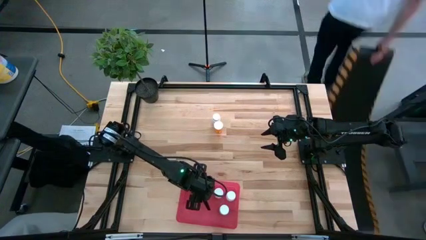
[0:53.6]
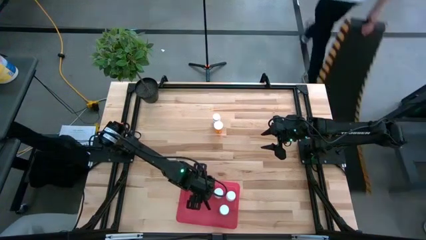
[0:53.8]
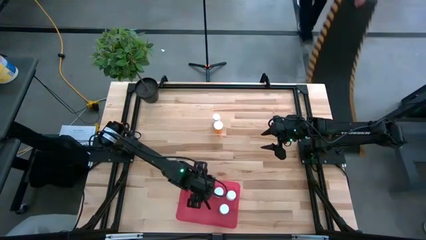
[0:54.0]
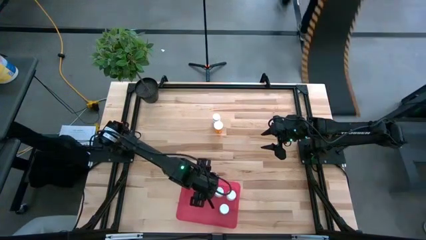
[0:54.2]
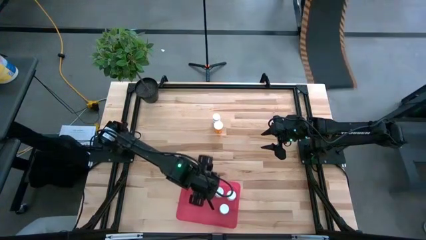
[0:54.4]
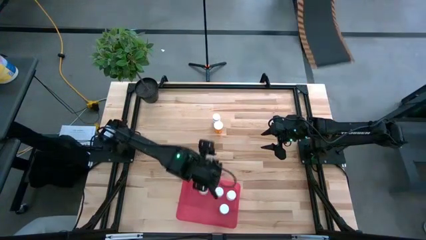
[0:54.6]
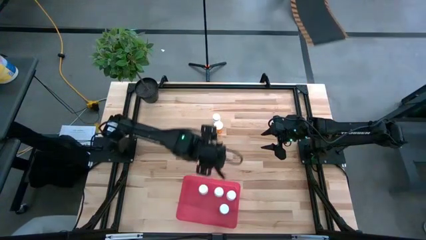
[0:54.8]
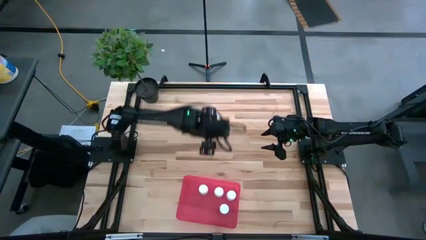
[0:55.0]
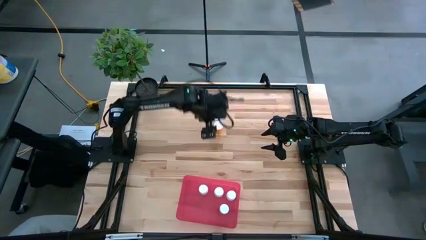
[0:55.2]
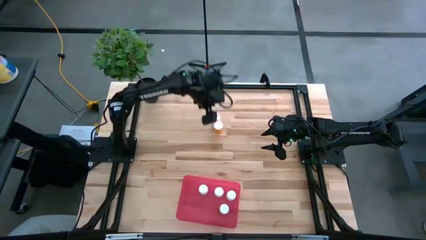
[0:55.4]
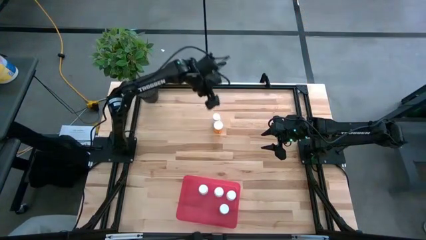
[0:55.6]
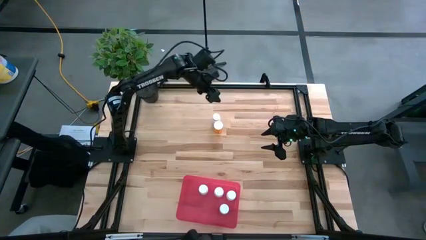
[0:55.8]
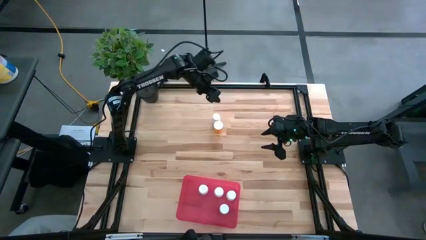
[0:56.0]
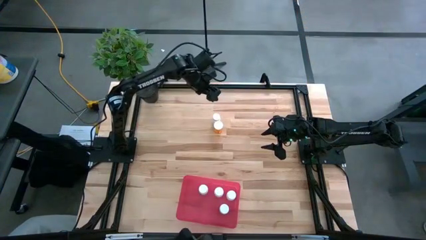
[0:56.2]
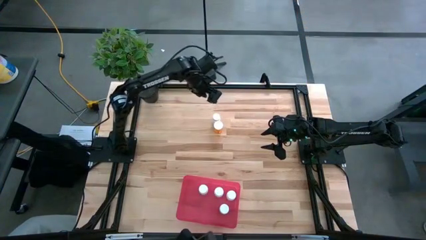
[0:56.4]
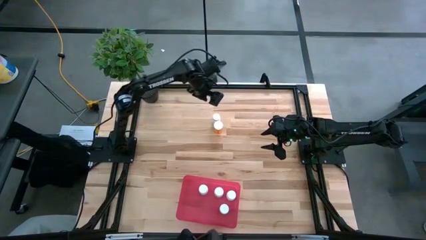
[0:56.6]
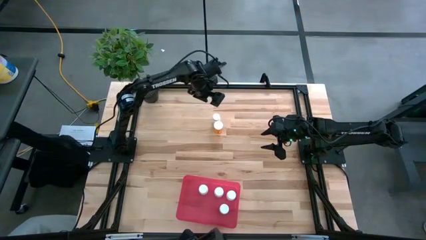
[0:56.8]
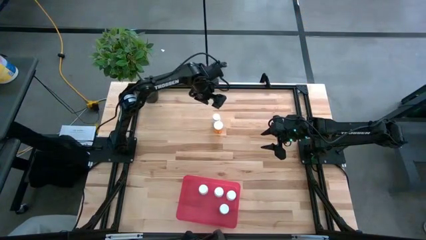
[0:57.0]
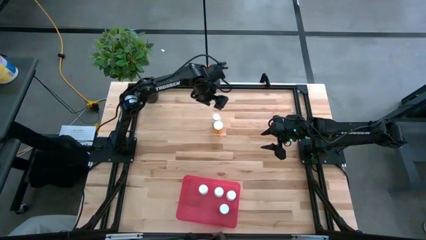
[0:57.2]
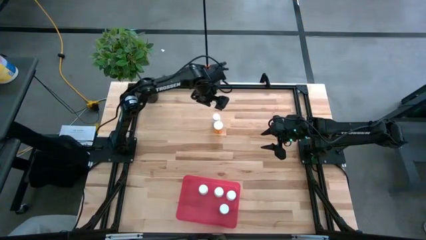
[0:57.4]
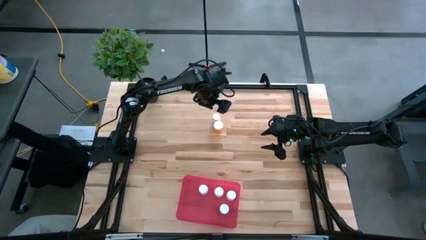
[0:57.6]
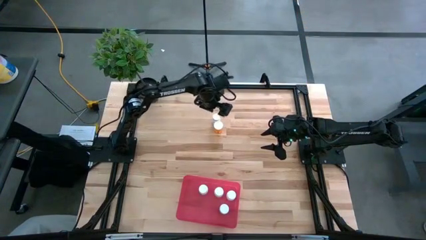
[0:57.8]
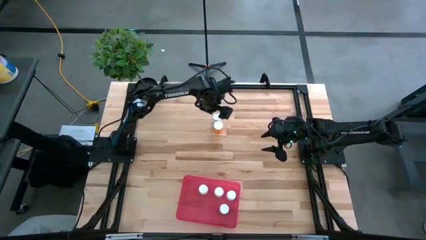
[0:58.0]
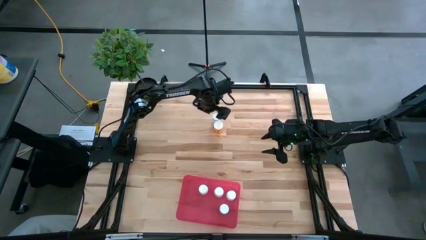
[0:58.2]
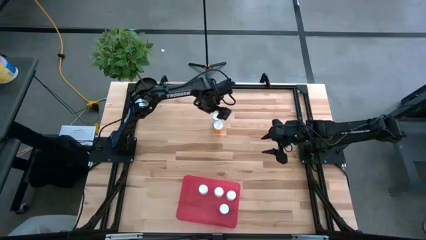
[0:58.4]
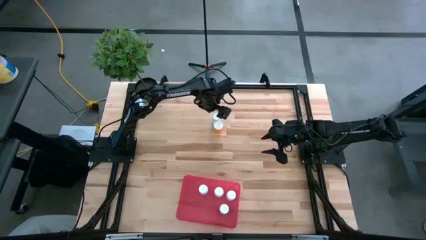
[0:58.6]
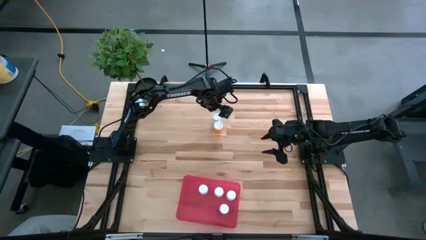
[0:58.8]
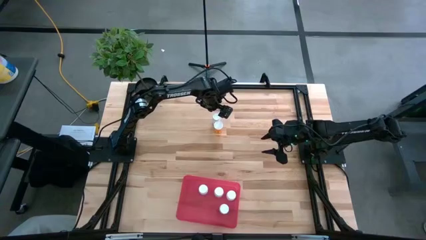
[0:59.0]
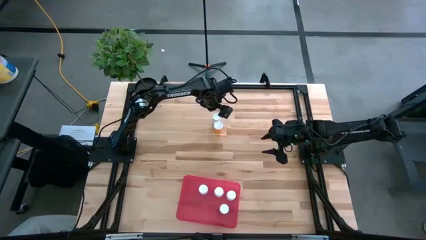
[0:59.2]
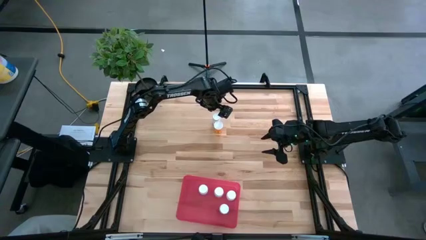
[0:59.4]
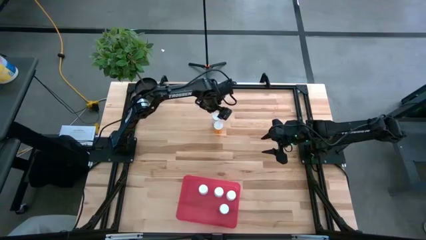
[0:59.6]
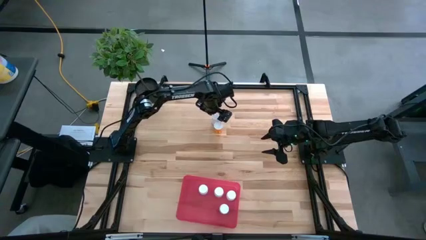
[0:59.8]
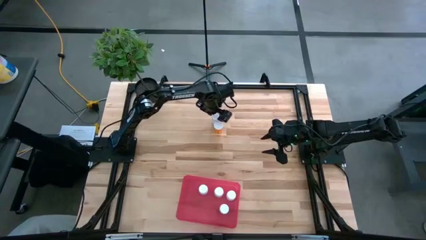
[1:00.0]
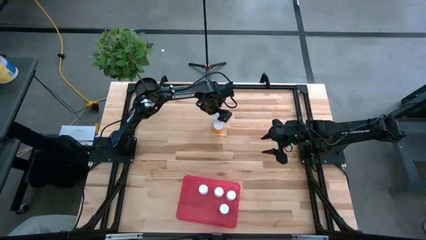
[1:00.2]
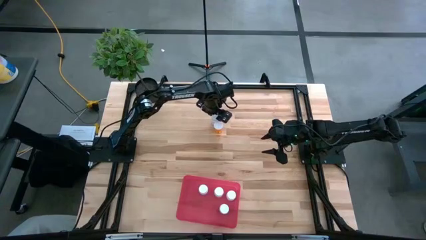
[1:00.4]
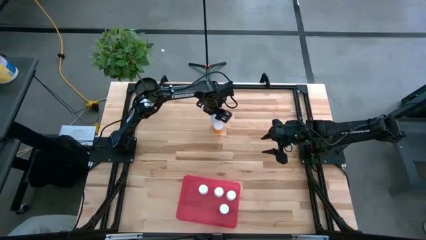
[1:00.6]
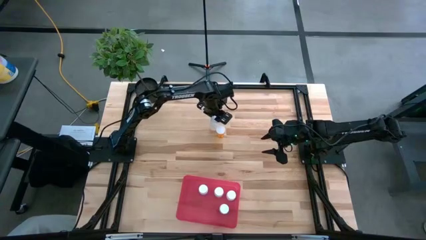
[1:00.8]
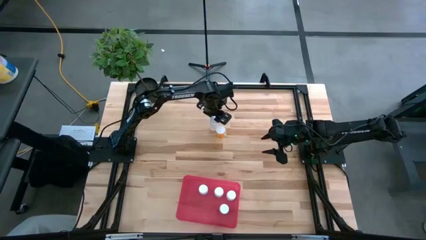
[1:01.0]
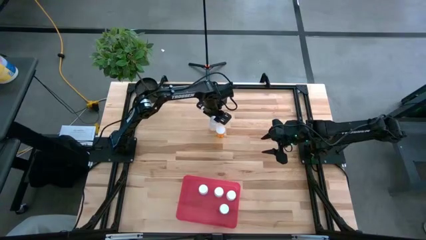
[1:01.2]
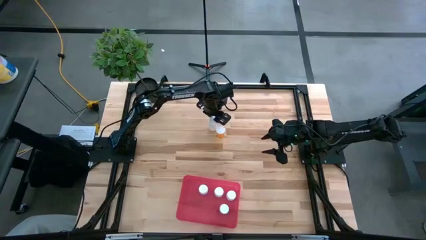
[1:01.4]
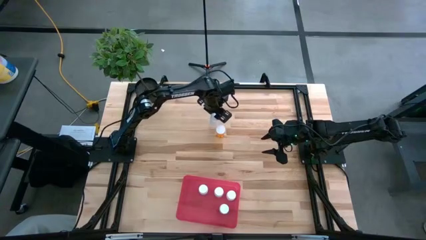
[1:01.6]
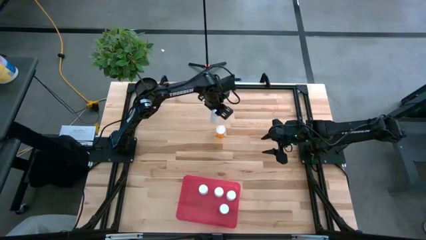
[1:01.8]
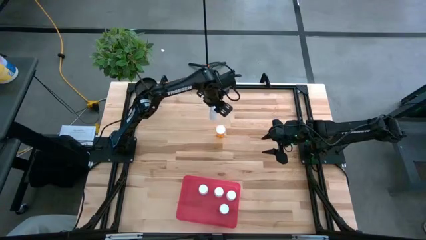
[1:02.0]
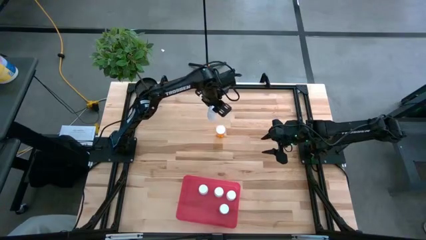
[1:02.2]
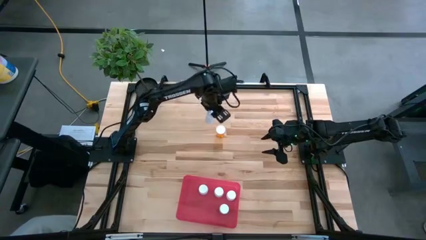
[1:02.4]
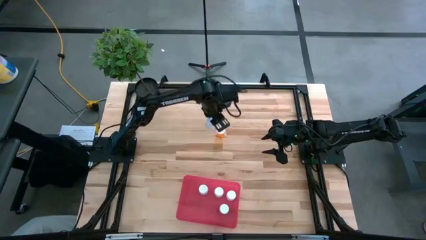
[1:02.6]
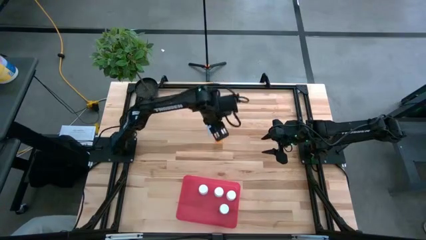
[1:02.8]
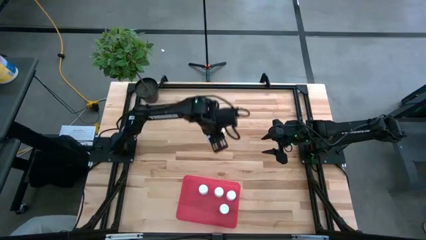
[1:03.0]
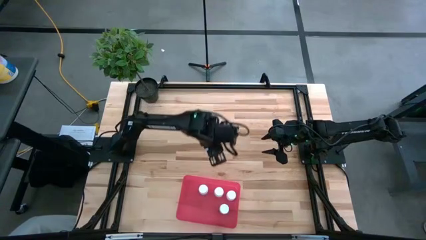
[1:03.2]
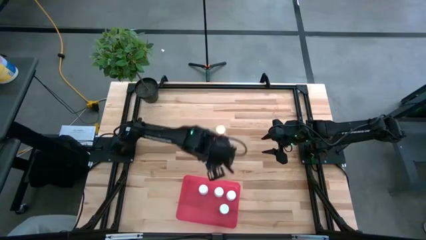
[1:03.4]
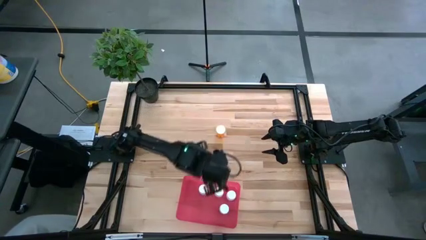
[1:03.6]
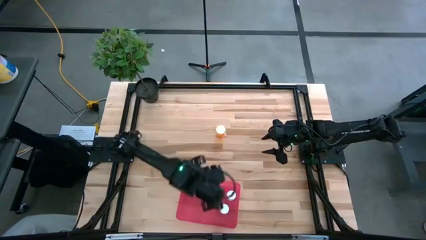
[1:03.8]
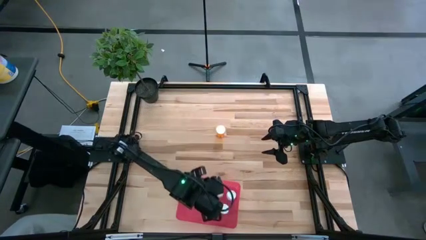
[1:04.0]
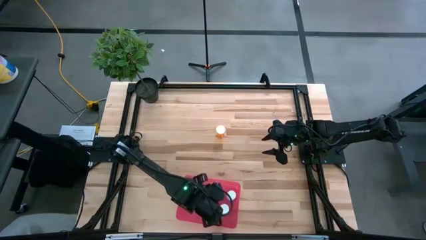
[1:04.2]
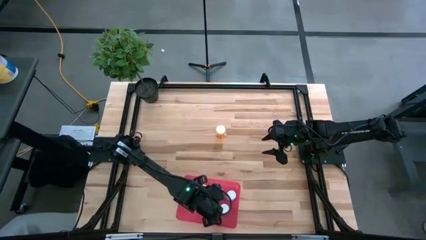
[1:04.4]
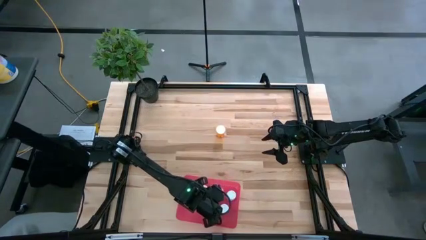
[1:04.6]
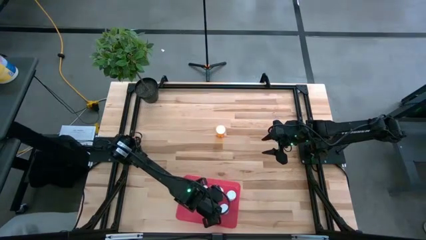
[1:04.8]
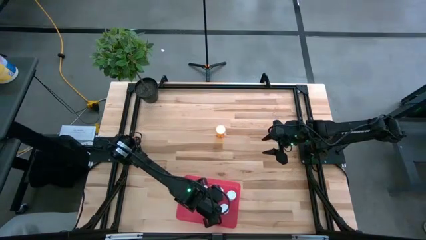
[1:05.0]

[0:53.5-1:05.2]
Task: Pick and place pill bottles into a basket
Put the white pill bottle into the red bin

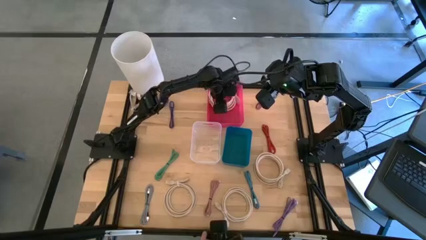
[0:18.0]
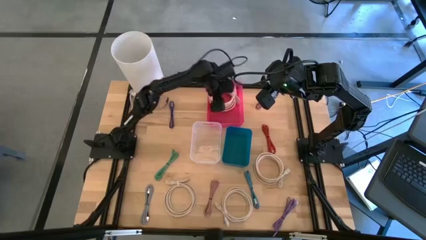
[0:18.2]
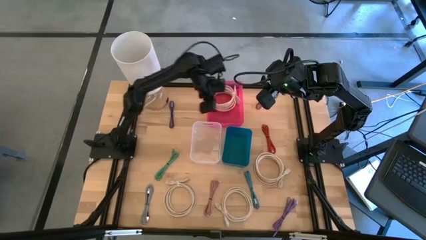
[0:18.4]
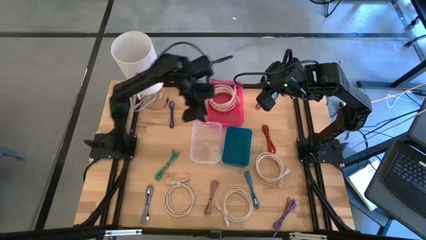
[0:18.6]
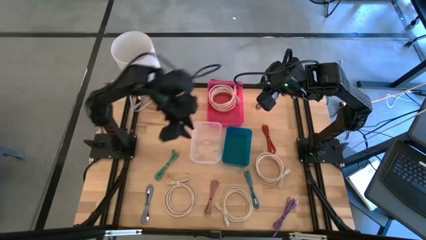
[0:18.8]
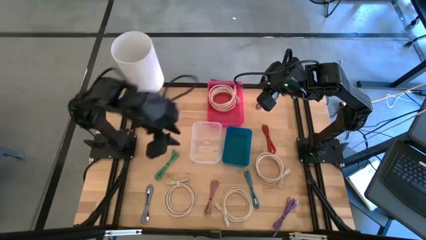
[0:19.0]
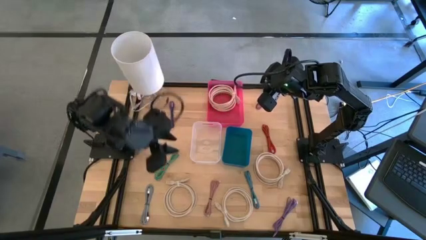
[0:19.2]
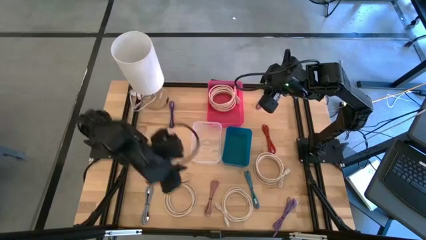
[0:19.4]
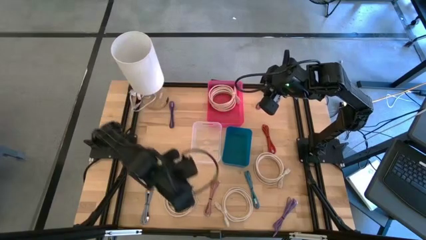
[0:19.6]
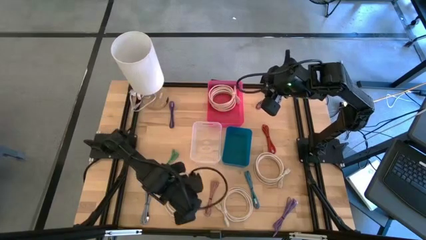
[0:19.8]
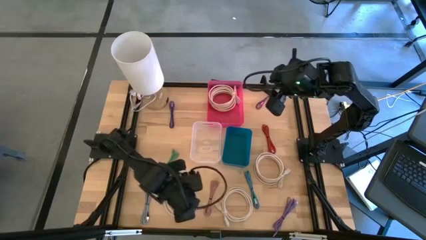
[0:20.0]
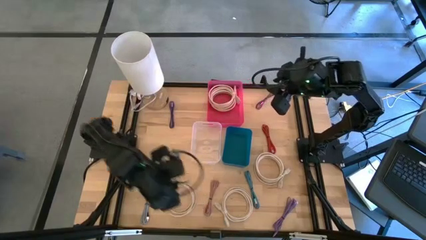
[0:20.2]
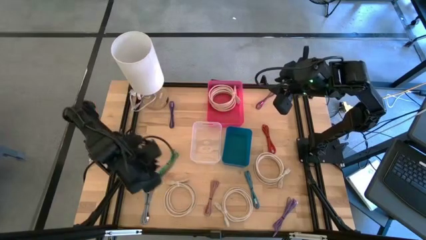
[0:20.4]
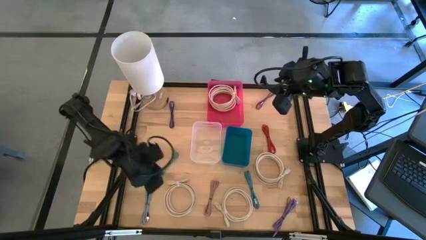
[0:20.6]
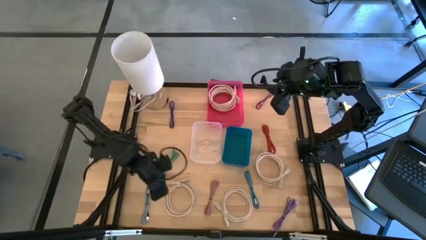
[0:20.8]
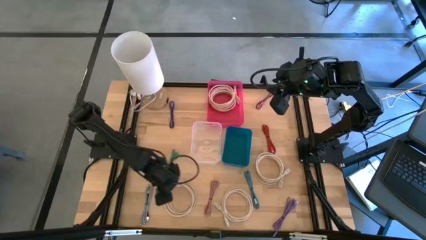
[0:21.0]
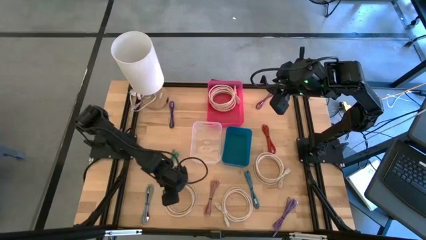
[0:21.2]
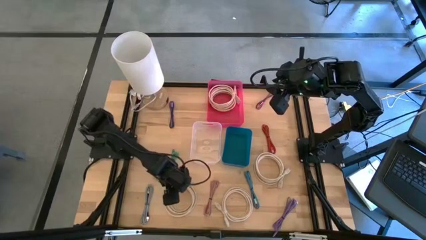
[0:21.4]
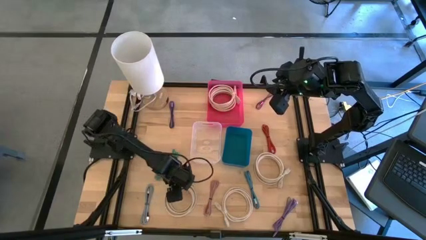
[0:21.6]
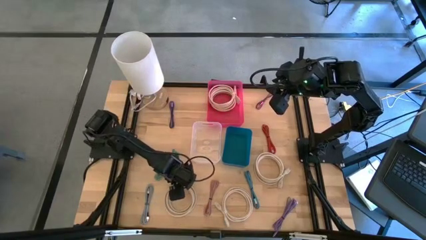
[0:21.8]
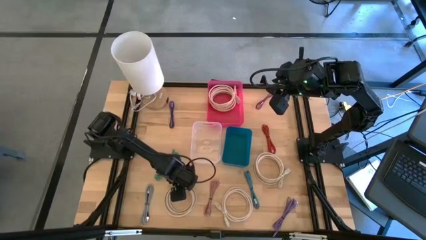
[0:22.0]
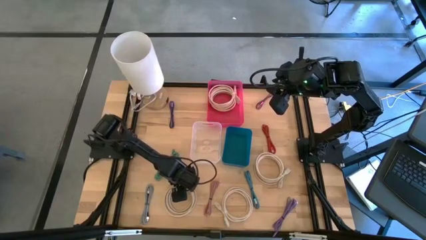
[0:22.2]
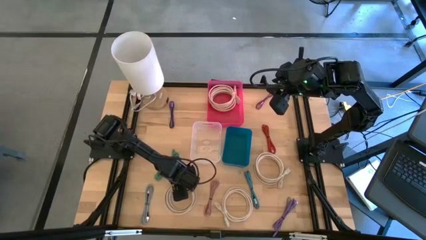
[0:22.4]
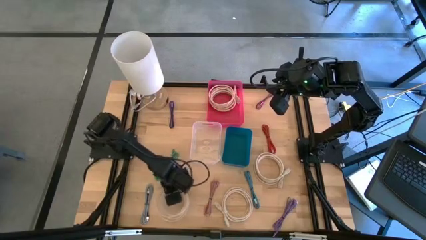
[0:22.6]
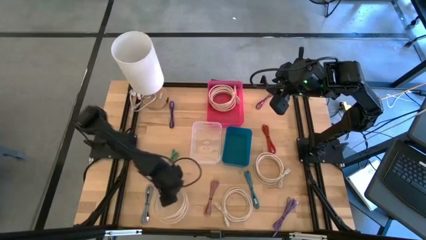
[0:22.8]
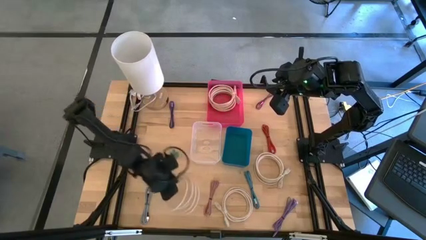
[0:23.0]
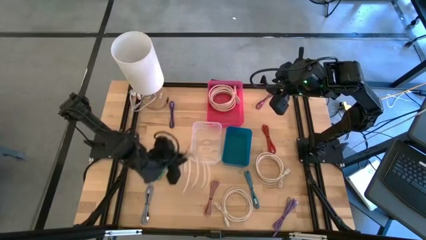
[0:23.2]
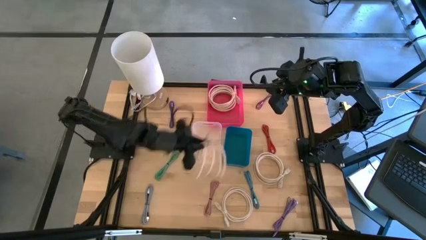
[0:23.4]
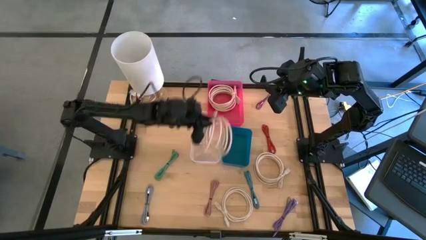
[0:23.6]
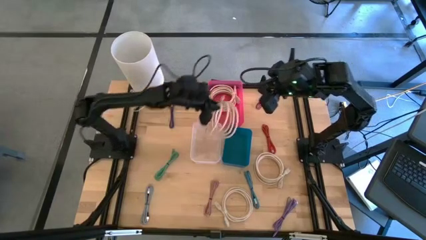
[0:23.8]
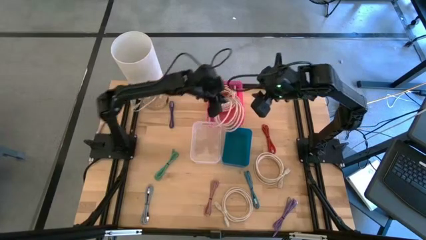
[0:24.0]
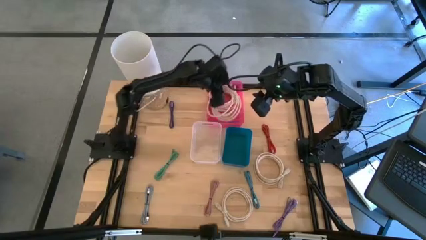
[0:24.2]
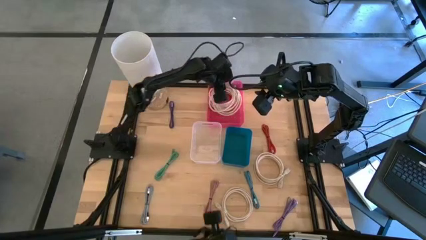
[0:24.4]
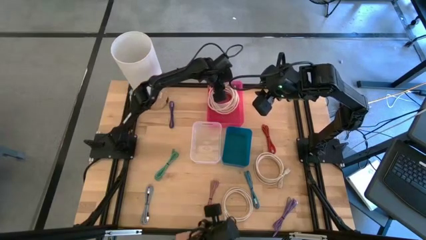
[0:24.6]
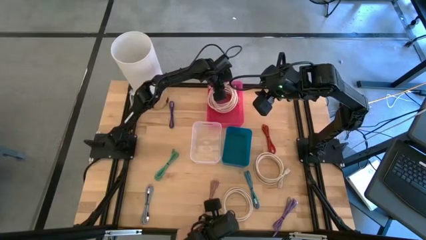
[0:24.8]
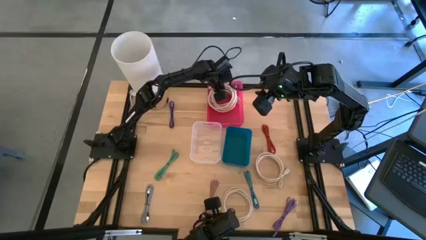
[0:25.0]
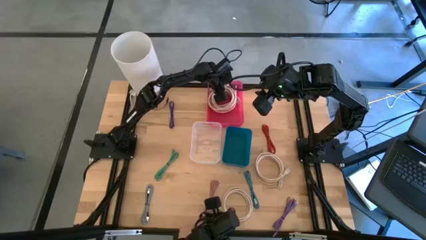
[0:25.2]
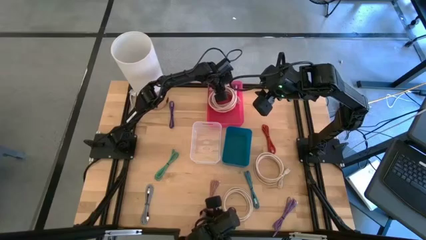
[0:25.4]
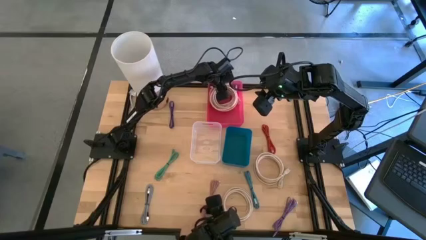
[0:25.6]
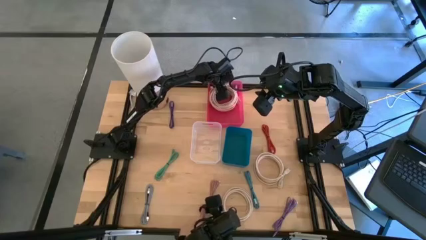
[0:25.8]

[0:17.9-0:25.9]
Task: Pick & Place USB Port
Put the light brown HDMI cable into the pink bin
